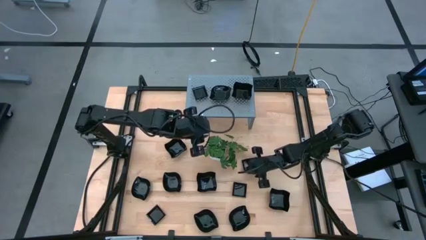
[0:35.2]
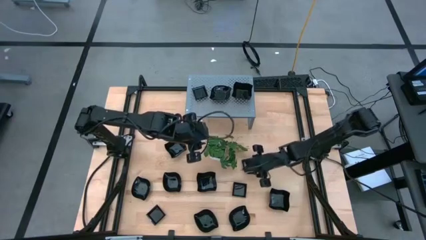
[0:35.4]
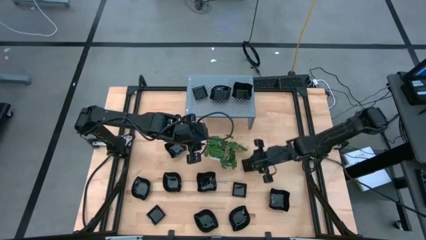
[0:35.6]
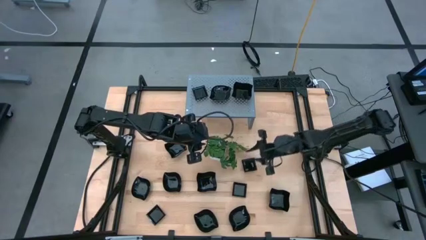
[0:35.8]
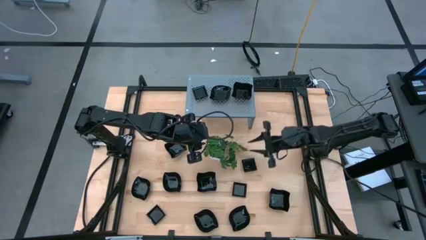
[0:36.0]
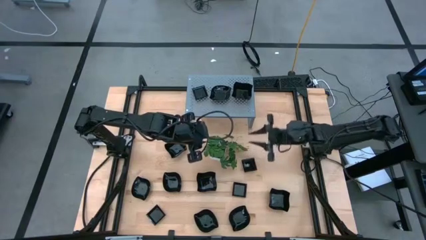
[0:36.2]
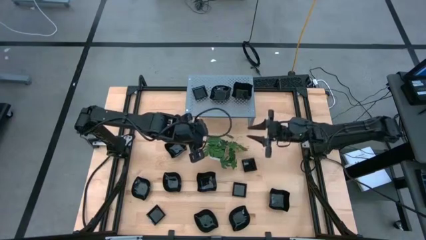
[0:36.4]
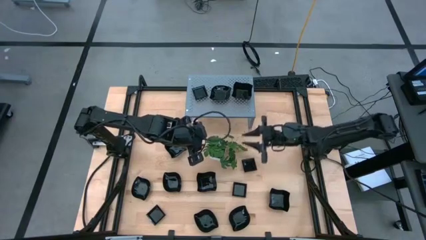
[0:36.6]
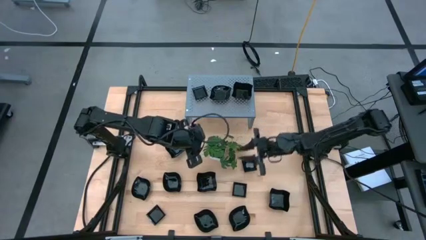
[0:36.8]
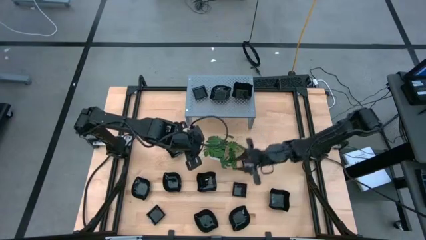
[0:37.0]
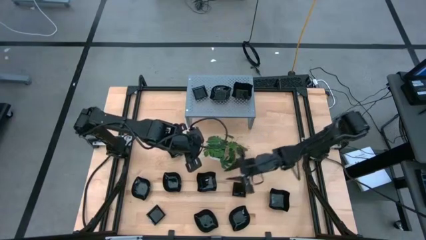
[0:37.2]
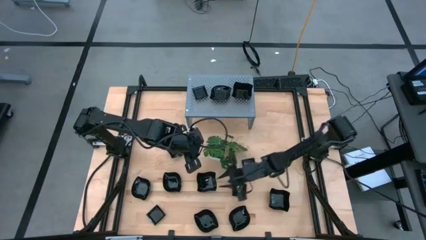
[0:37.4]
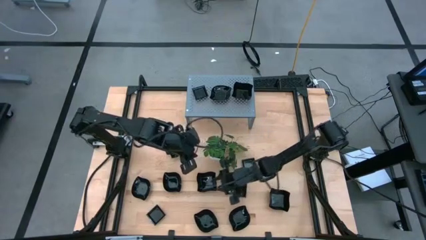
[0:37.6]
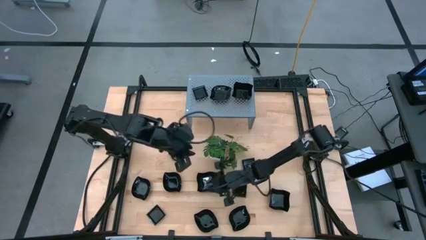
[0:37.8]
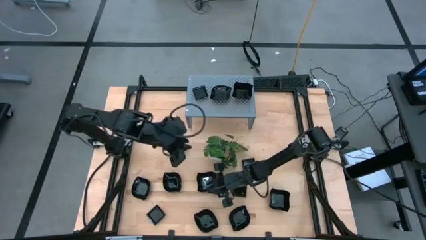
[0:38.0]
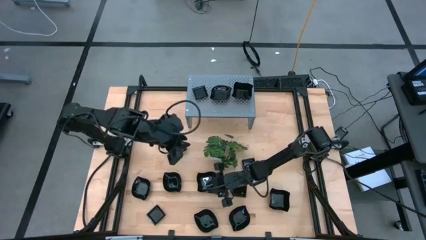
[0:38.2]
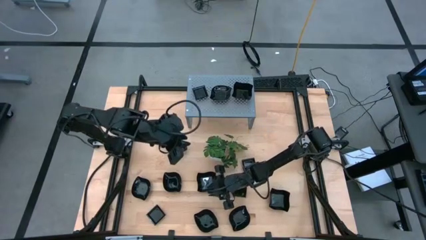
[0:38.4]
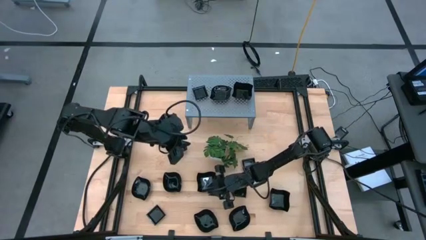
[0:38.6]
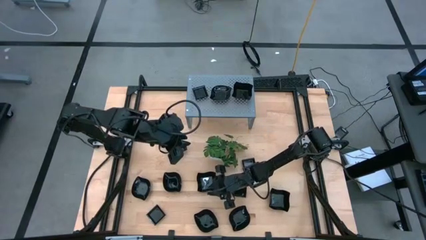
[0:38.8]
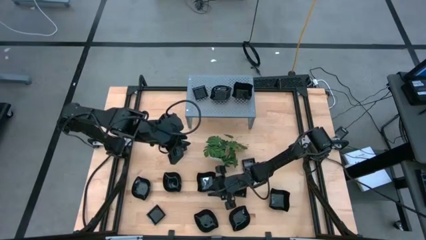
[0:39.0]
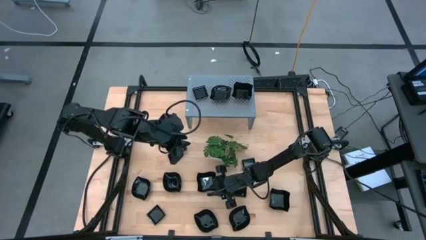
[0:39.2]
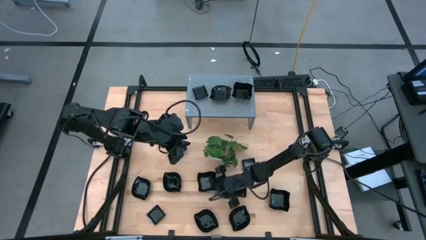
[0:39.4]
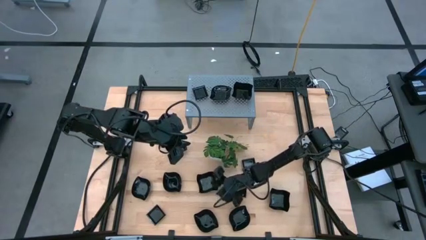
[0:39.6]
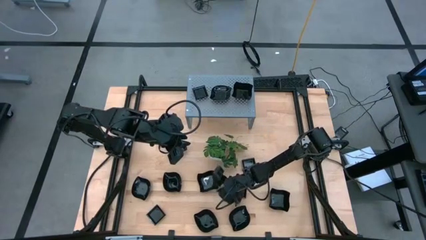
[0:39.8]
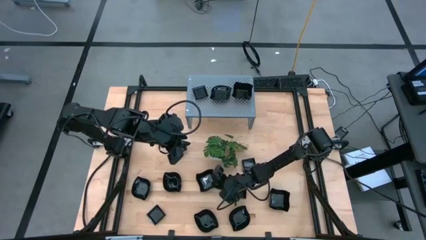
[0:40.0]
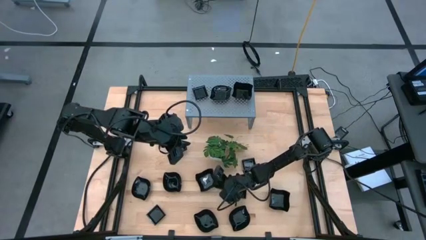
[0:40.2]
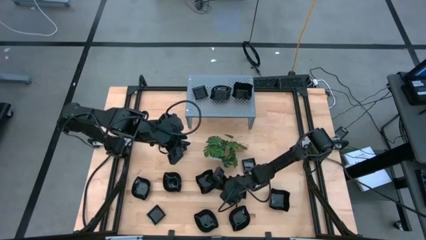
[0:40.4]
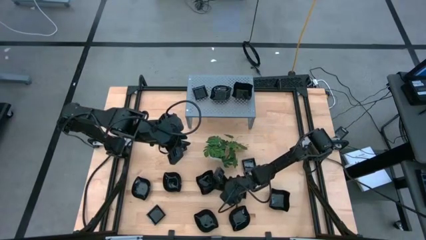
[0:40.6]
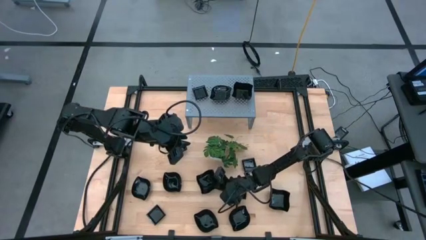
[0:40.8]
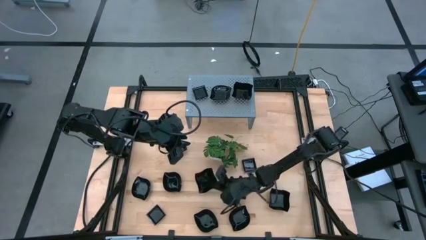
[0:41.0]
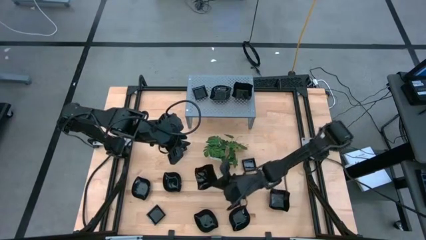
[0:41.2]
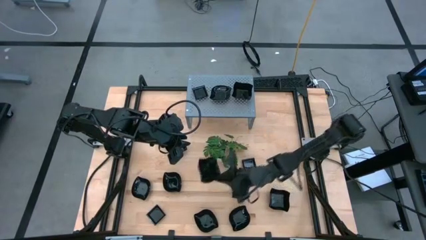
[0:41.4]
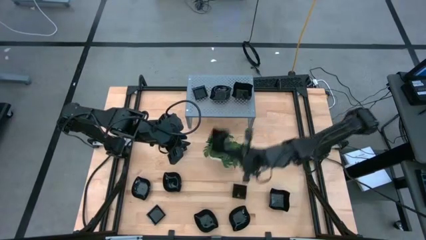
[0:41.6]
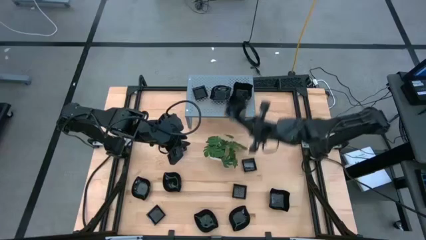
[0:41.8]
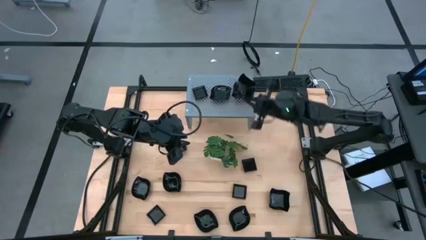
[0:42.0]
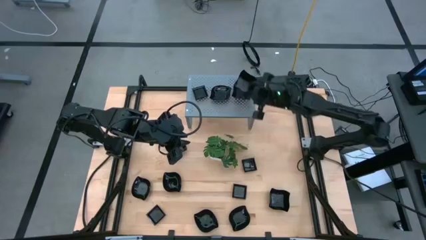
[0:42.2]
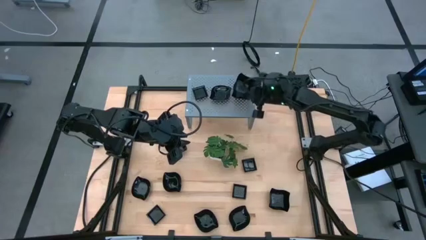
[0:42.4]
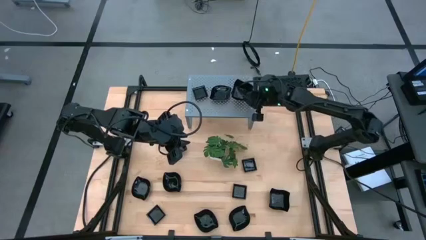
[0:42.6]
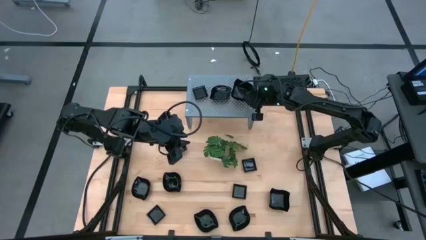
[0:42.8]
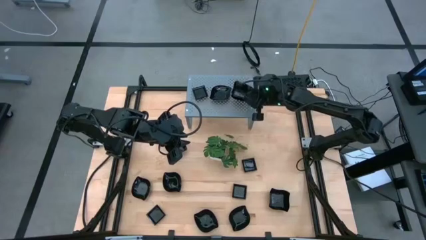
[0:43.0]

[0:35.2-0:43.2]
Task: Pick & Place Mini shaped plates
Stack the distorted square black bowl on top of the other distorted square black bowl on the shelf

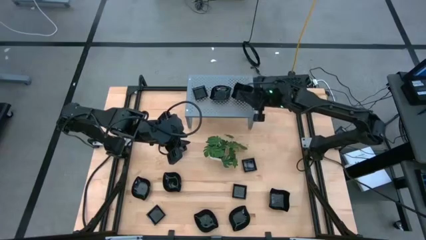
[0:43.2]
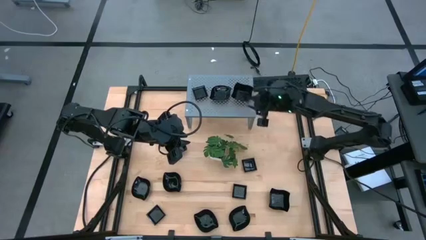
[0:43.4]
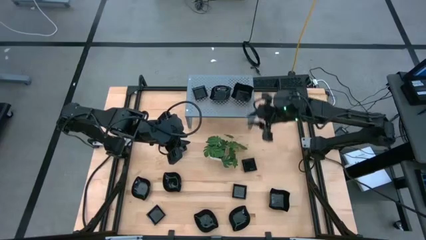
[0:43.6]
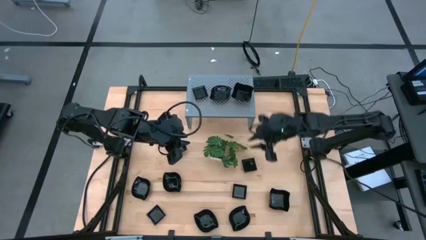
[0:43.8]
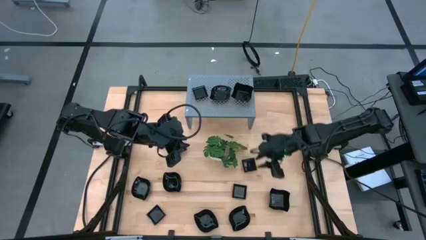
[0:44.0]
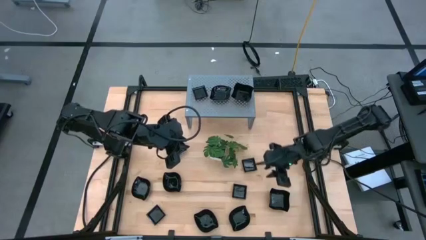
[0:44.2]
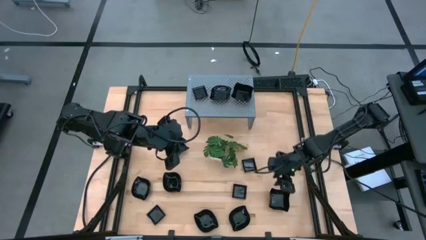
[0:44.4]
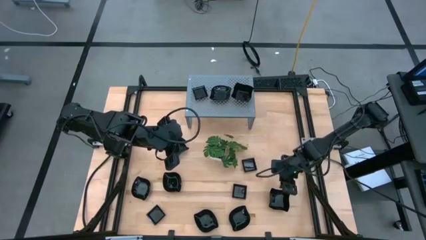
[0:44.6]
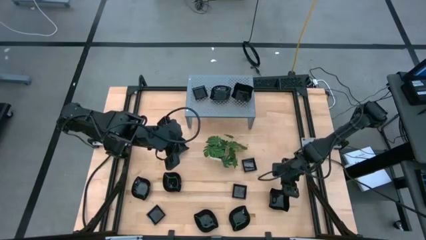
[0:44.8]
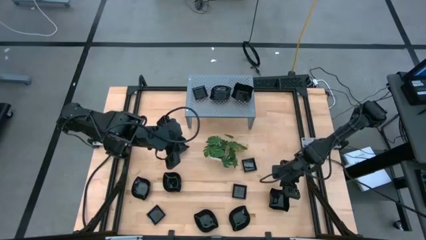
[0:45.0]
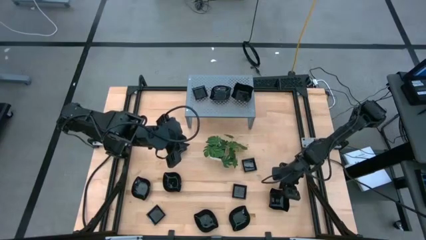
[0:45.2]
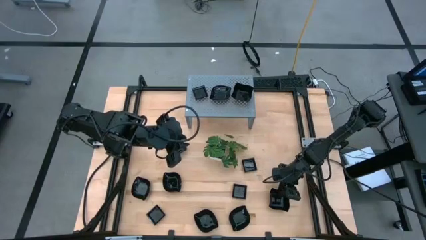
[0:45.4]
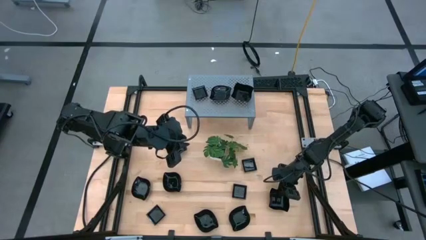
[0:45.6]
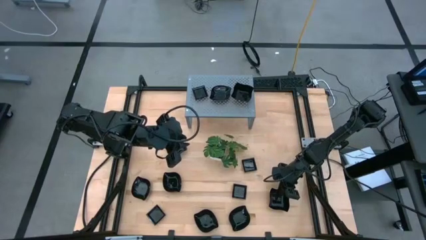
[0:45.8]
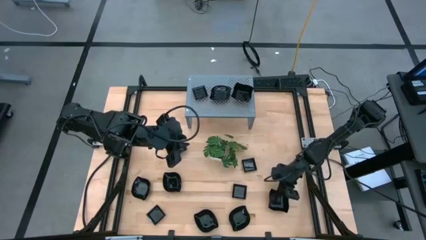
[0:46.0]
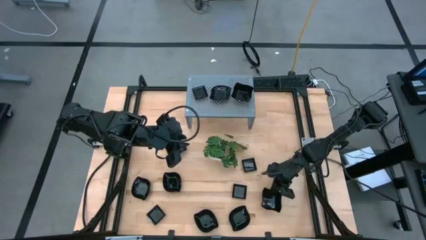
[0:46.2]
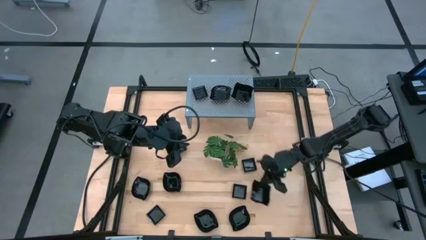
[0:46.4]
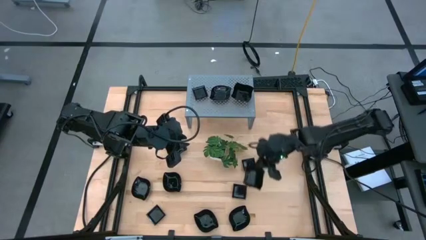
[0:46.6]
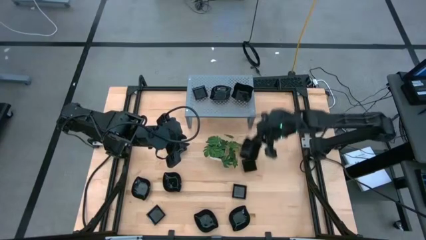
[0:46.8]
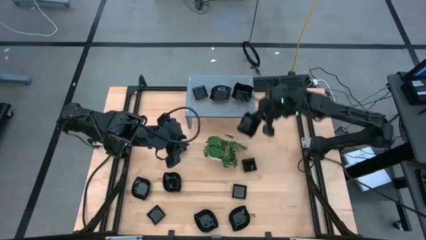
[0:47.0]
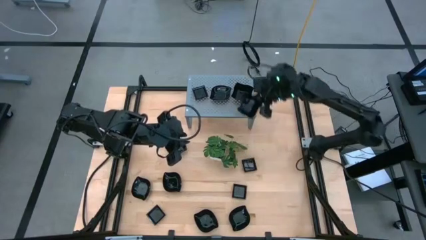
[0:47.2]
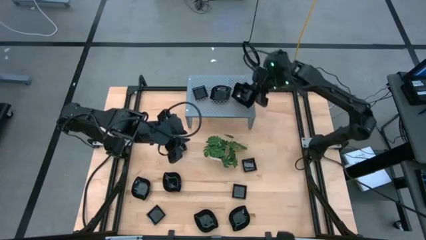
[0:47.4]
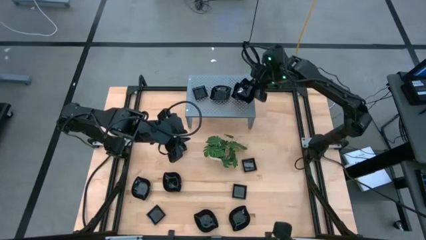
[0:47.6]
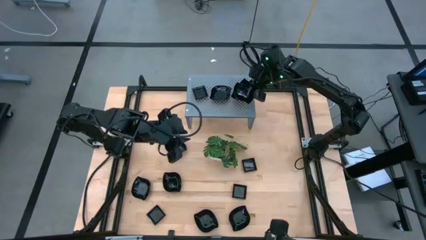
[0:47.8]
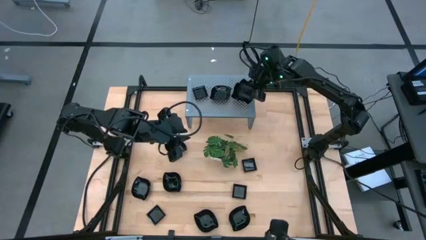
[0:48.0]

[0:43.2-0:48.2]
Stack the distorted square black bowl on top of the other distorted square black bowls on the shelf

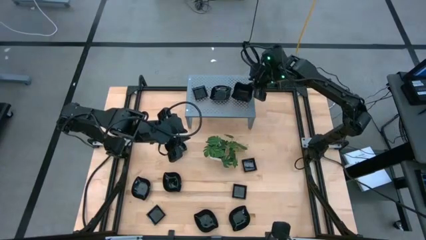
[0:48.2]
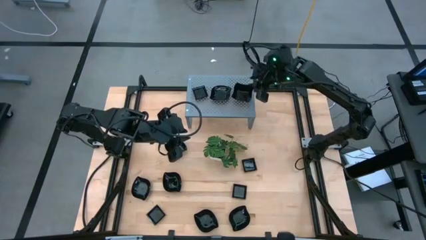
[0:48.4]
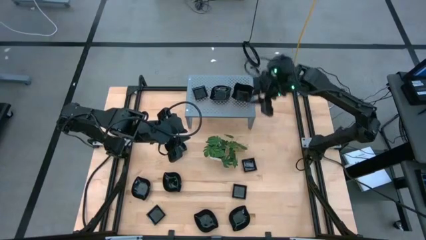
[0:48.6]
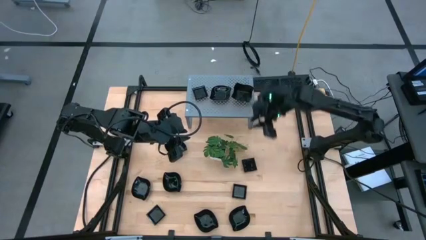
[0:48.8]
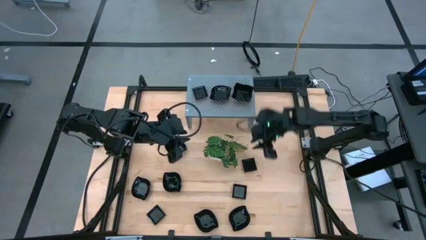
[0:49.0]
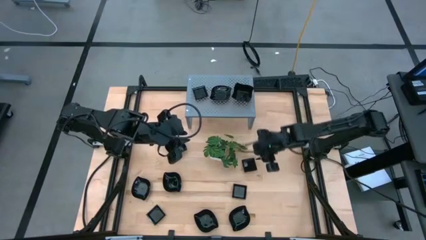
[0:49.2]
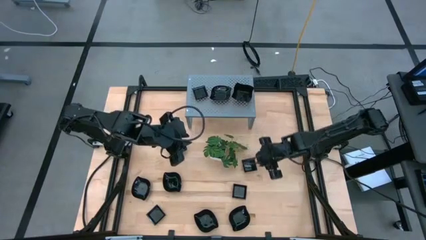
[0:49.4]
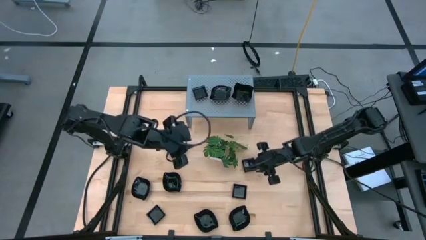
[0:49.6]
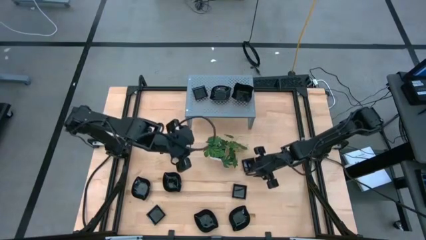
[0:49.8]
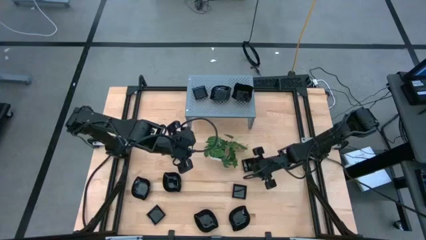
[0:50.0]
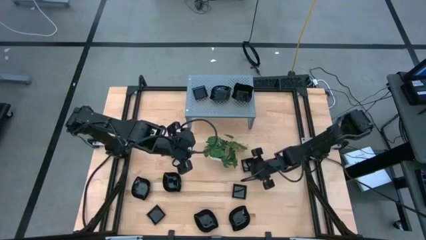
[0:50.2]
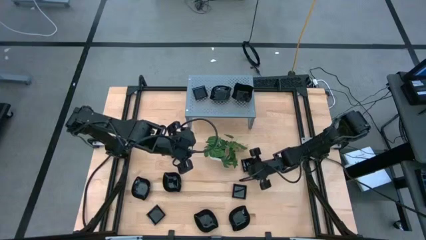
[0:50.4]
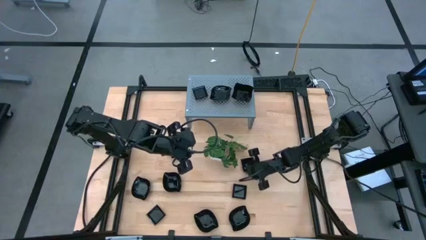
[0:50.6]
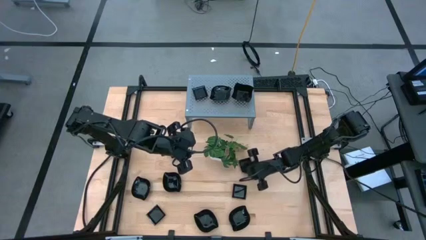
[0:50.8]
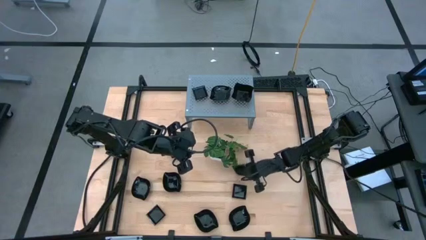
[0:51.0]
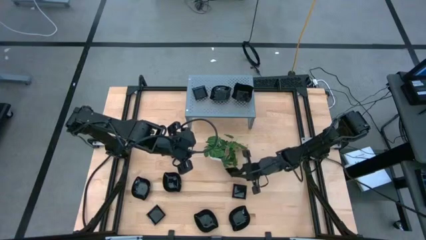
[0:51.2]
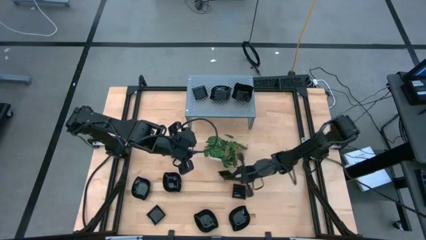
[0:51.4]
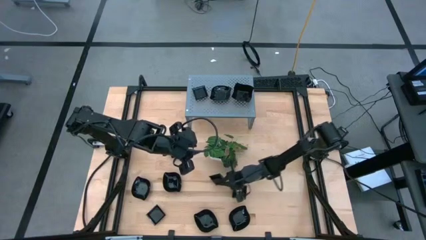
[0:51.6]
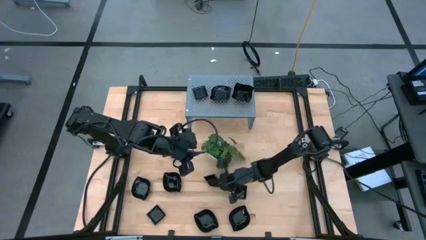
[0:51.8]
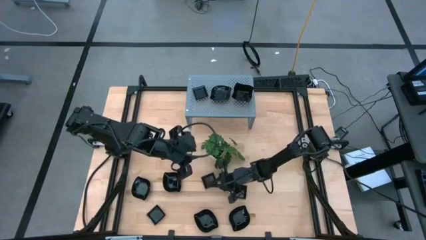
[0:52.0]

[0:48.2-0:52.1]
Stack the square black bowl on top of the other square black bowls on the shelf
